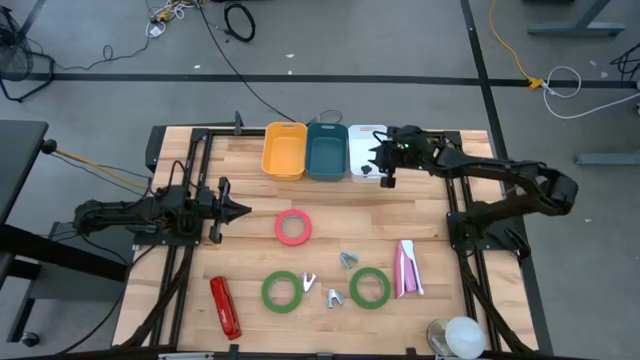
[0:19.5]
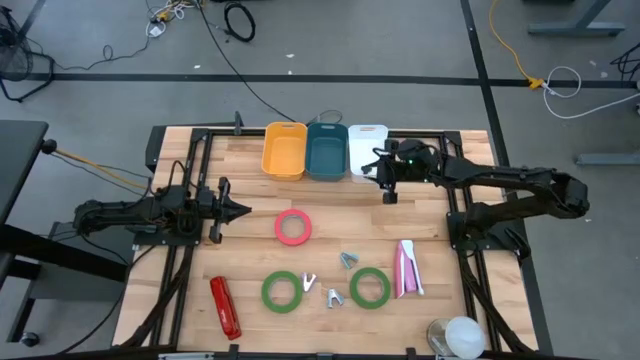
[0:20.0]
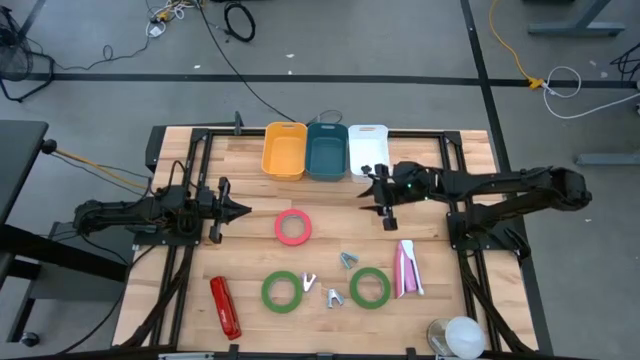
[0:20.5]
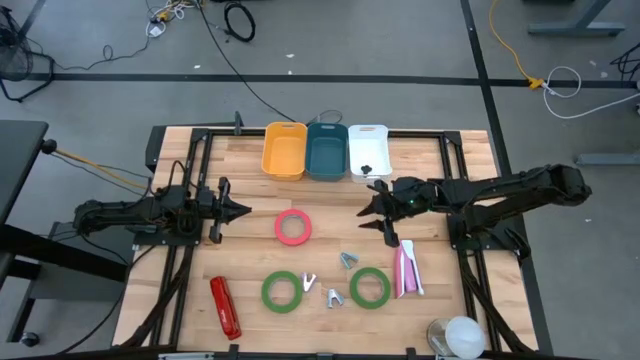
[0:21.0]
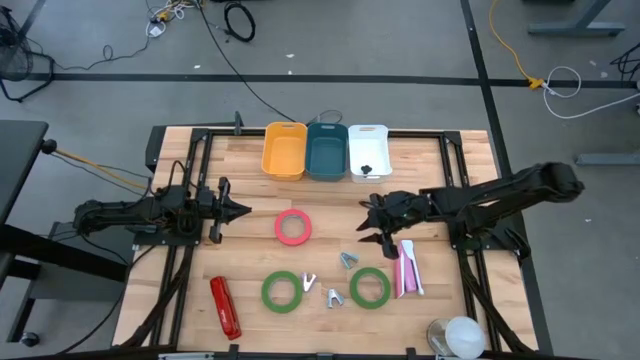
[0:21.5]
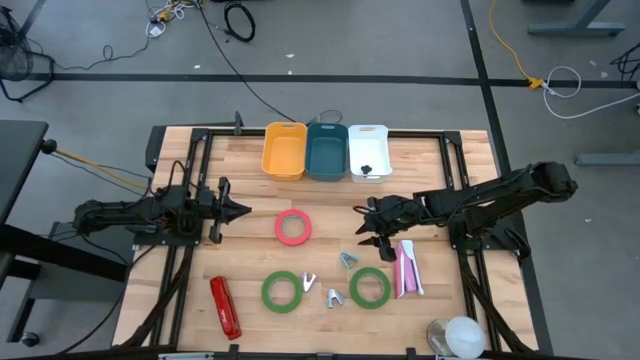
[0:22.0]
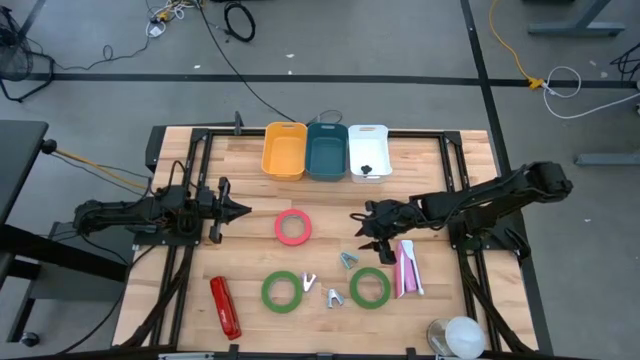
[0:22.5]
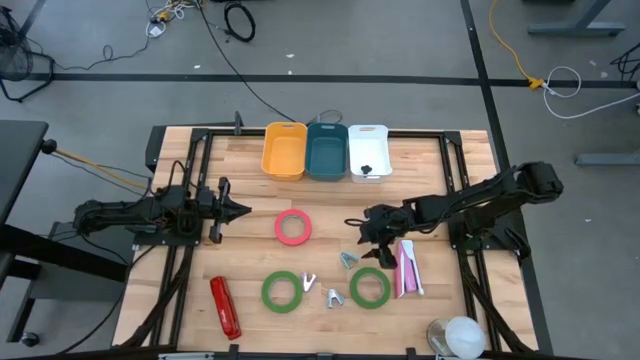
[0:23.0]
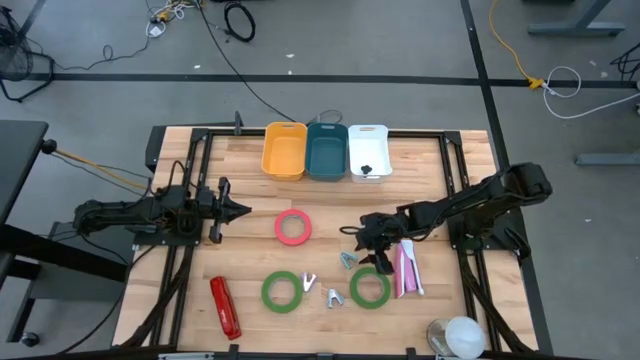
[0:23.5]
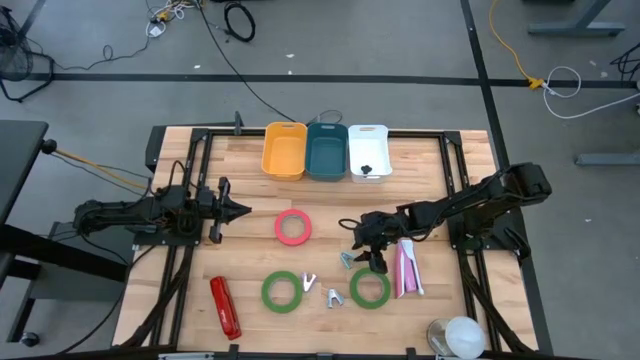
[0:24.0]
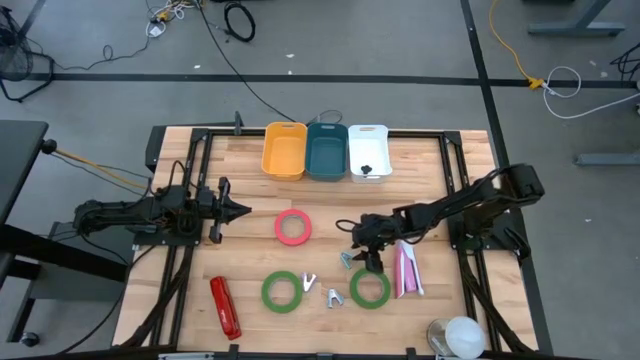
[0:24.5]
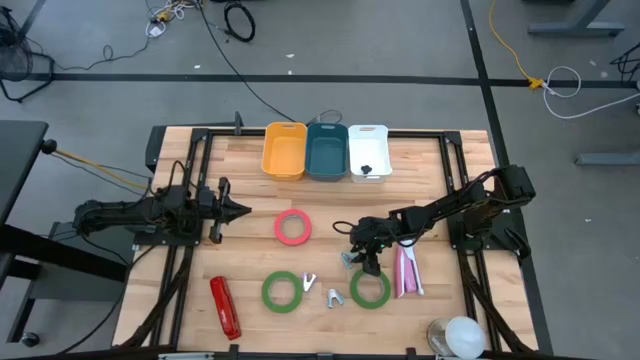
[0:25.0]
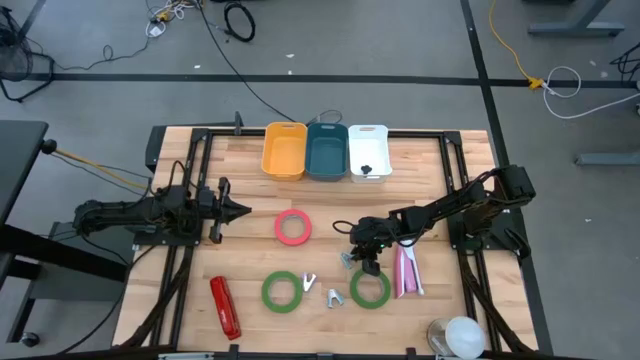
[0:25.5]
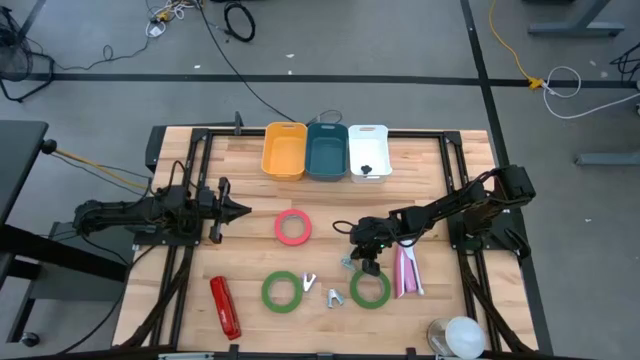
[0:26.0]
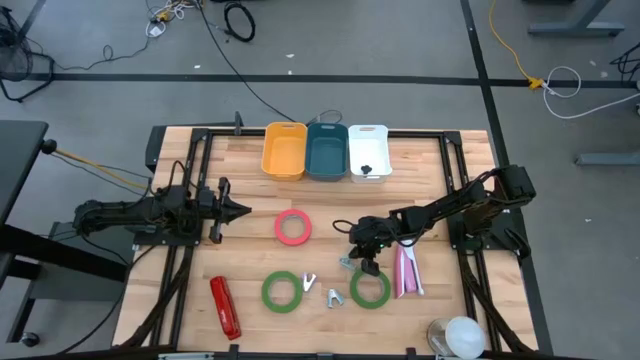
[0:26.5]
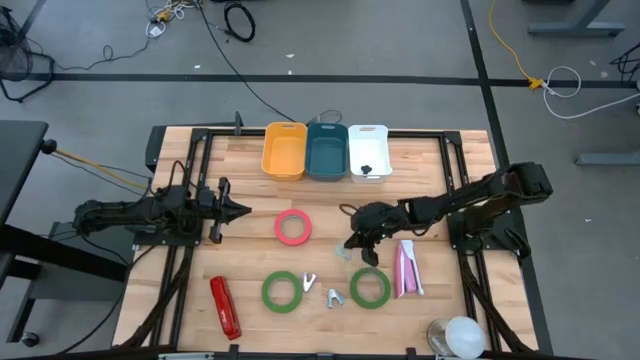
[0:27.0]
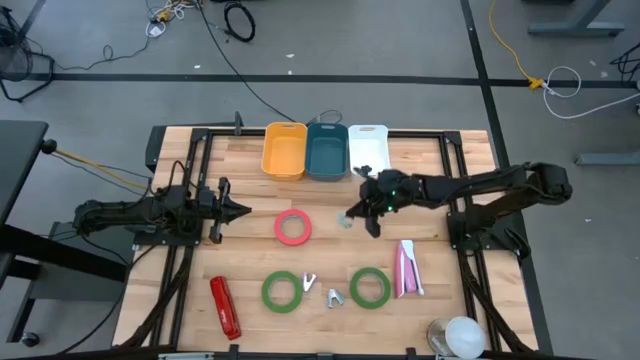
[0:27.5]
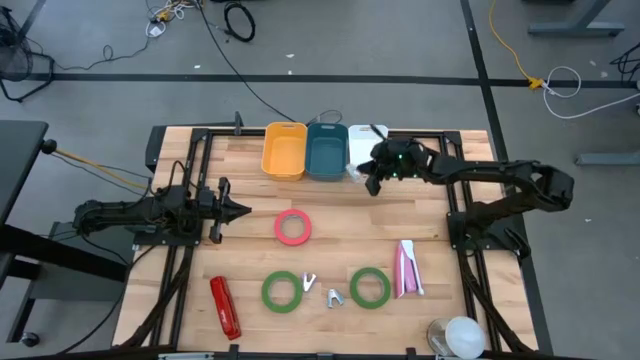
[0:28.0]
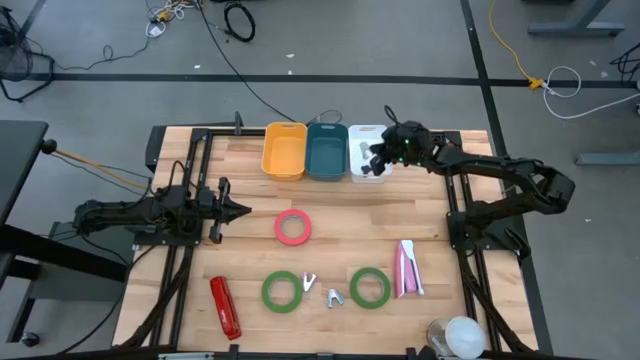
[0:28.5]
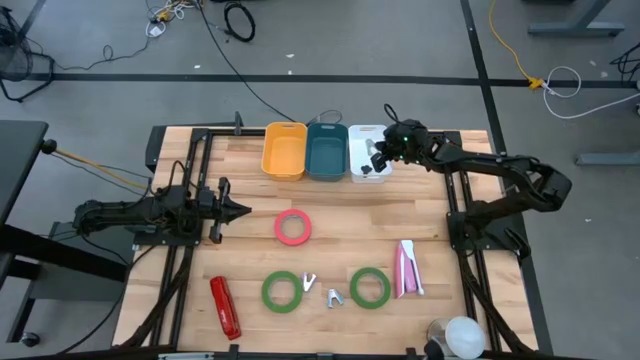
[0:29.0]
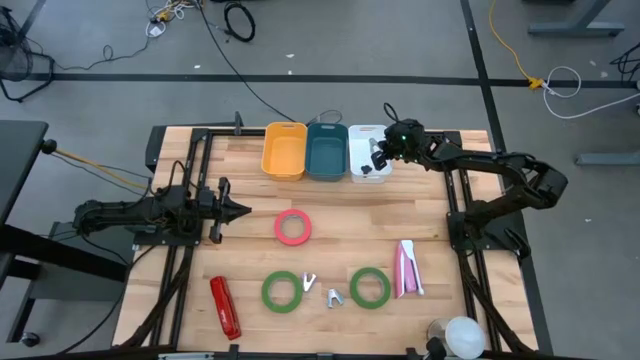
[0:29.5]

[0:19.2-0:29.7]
Task: Pick and place Stapler, Stapler remover, tape
Put the top blue staple remover into the white bin

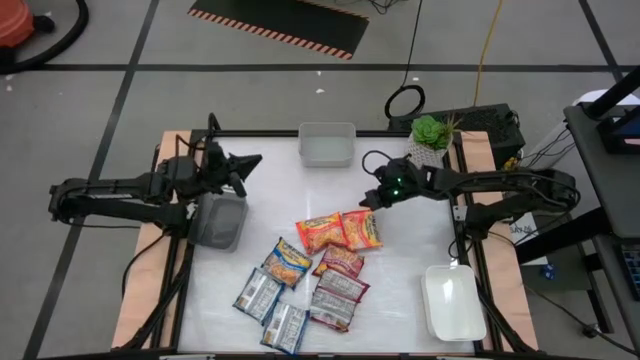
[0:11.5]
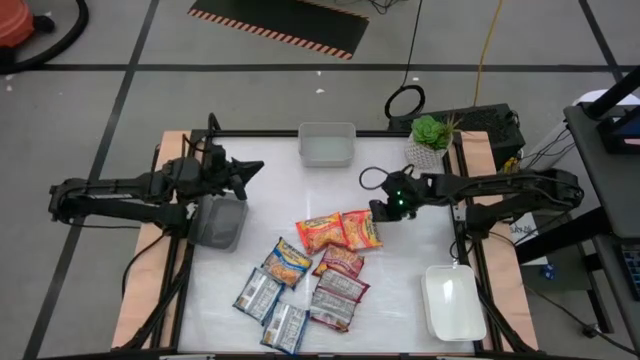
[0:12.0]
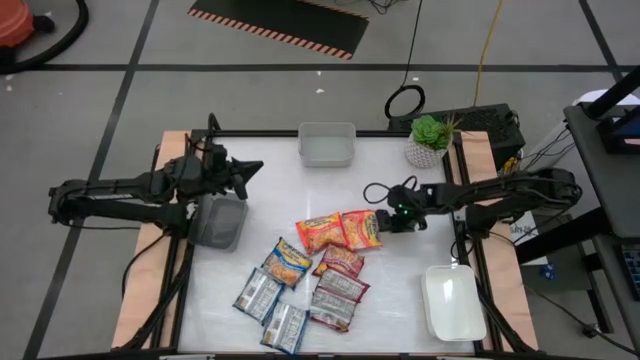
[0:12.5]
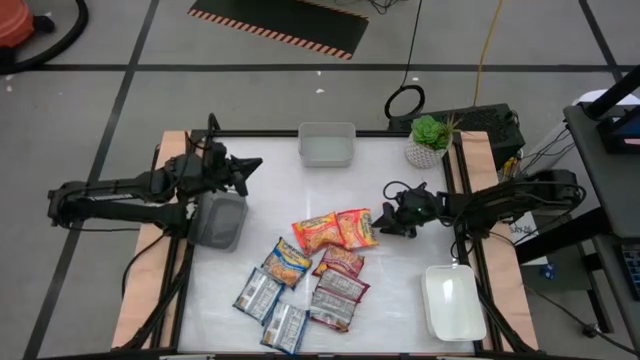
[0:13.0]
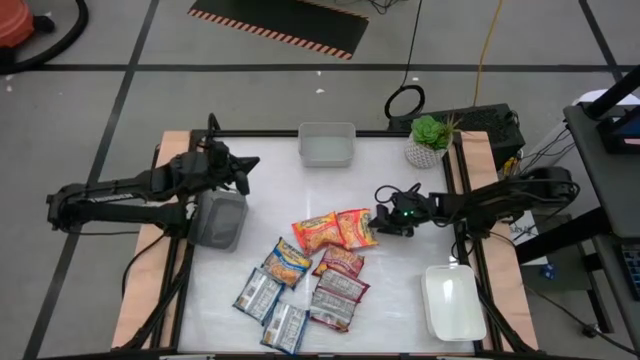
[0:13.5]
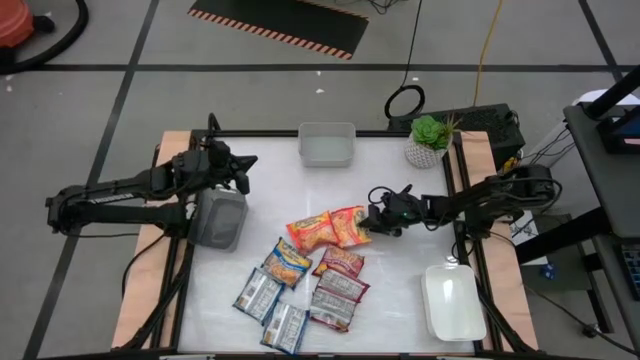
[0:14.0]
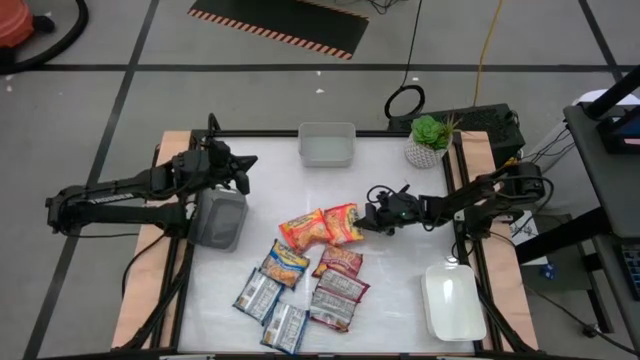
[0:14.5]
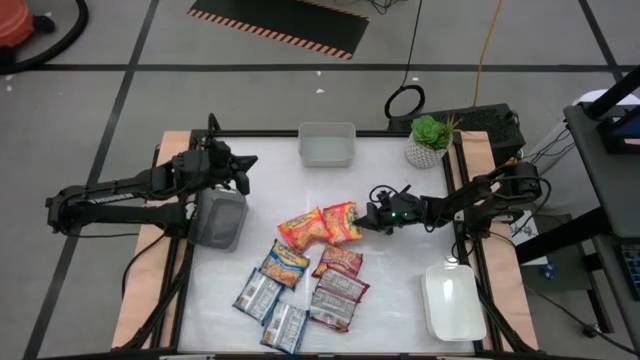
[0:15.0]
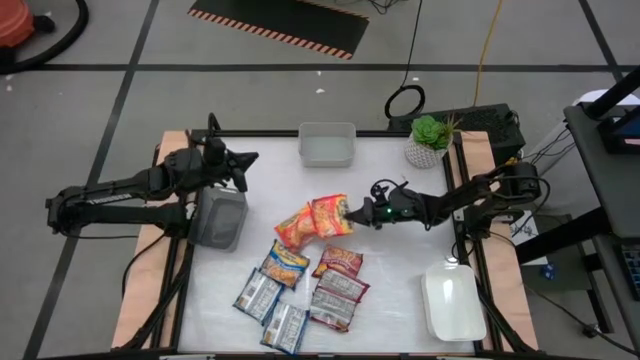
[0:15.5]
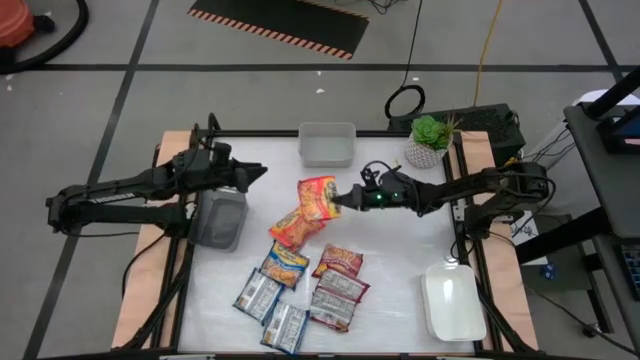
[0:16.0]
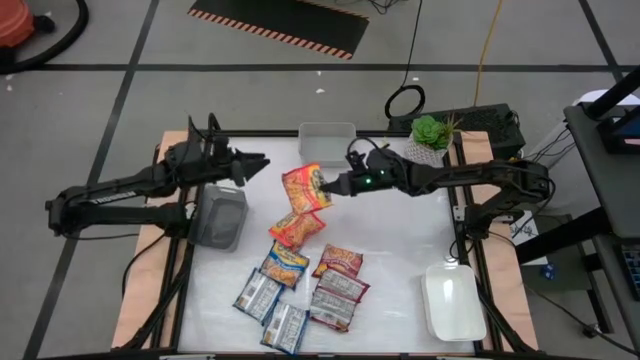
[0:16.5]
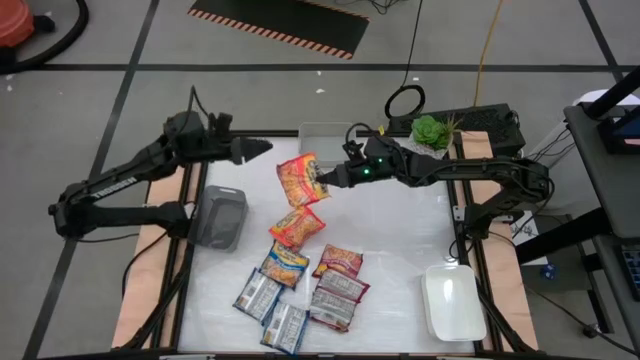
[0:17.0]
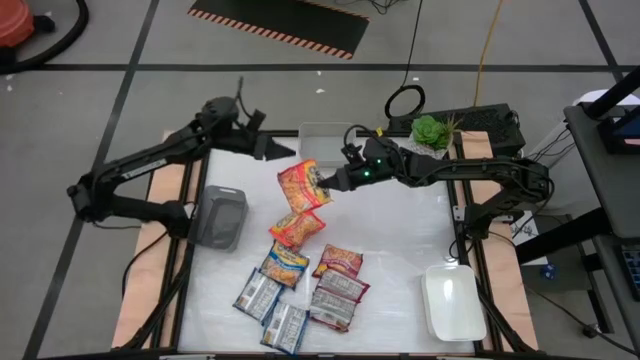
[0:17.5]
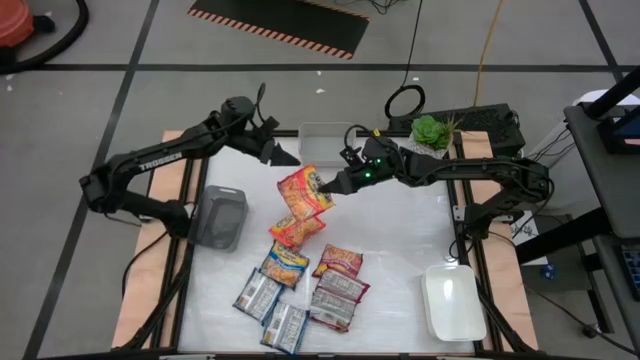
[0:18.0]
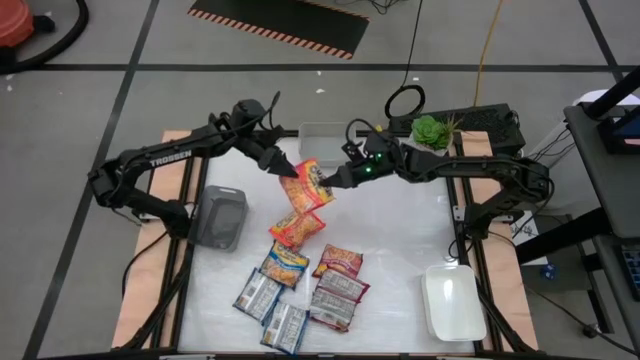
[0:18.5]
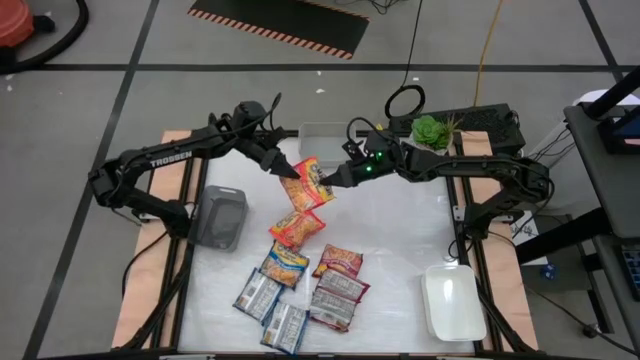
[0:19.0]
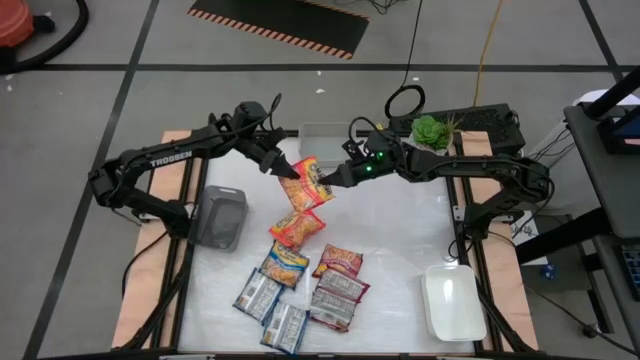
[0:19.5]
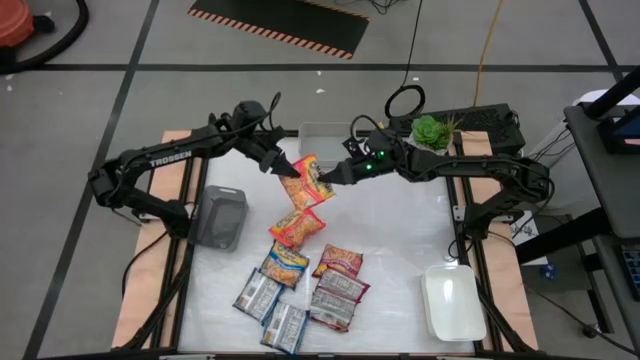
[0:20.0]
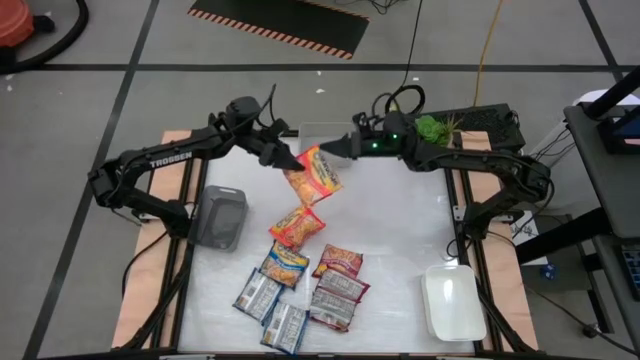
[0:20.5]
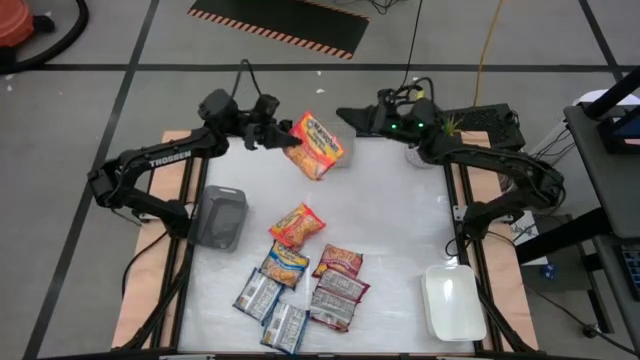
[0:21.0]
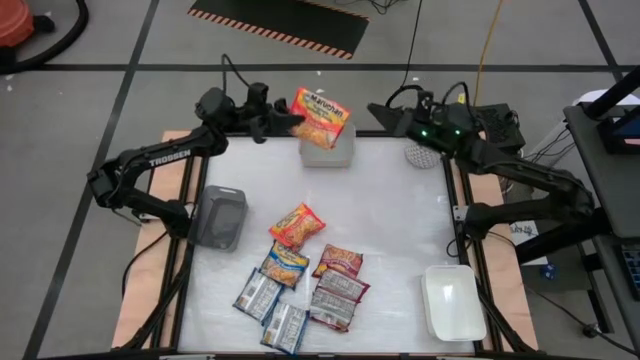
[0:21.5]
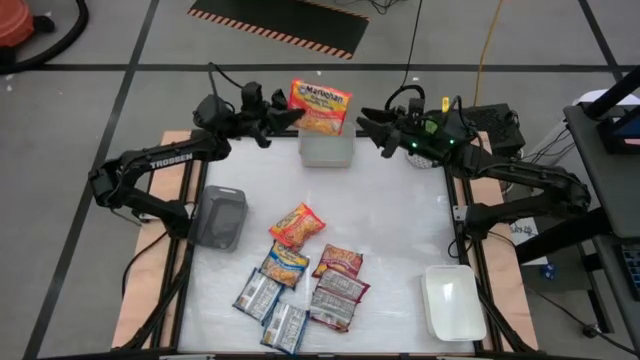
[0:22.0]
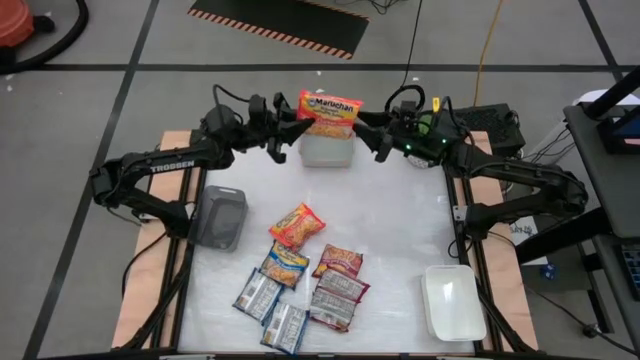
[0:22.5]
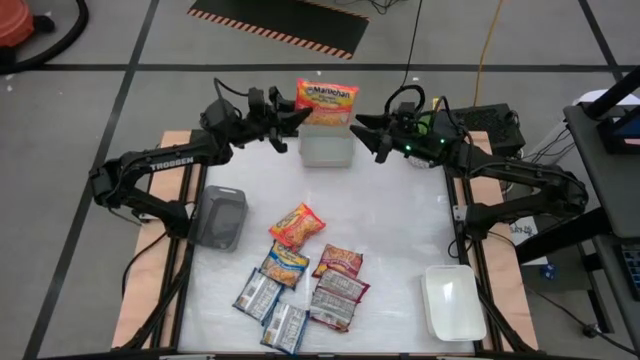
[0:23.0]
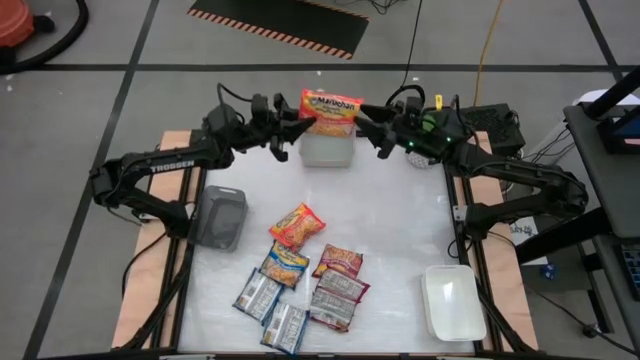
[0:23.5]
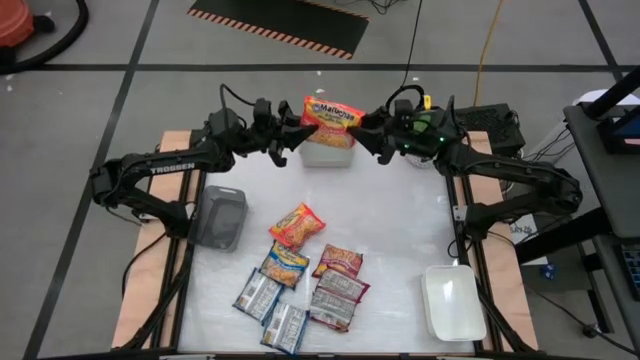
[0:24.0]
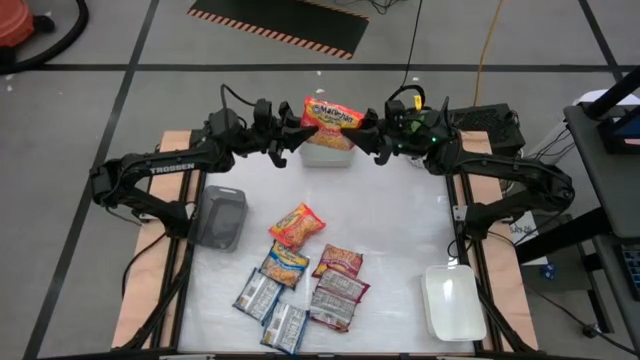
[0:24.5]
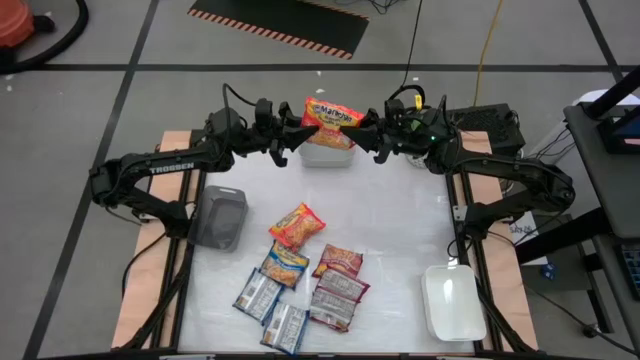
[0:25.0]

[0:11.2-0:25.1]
Task: Sort Maruchan noodles
Put the right orange noodle pack into the gray bin
